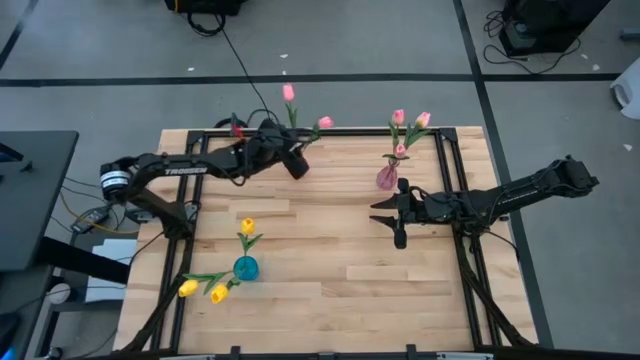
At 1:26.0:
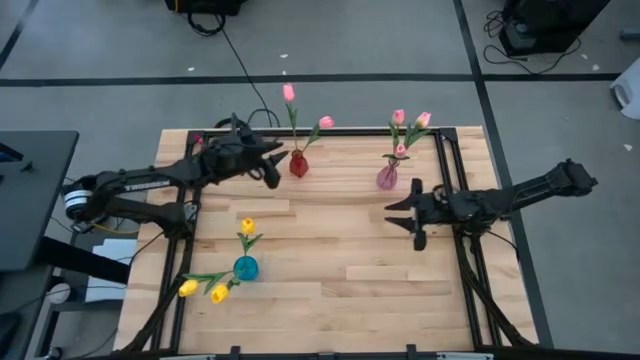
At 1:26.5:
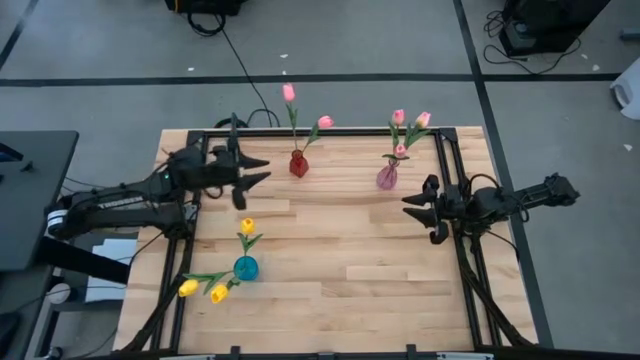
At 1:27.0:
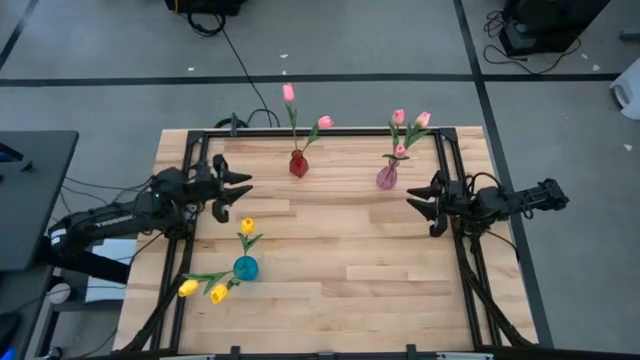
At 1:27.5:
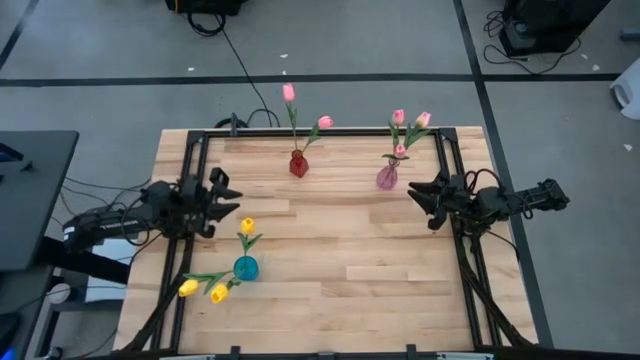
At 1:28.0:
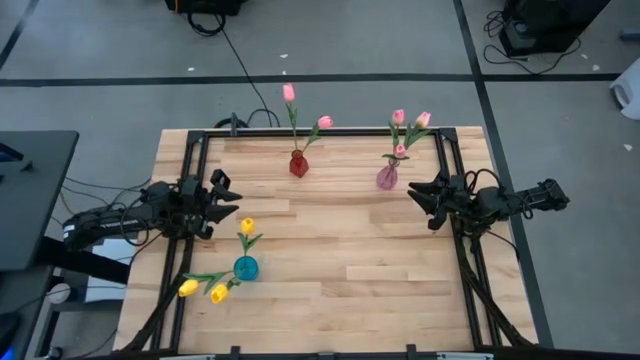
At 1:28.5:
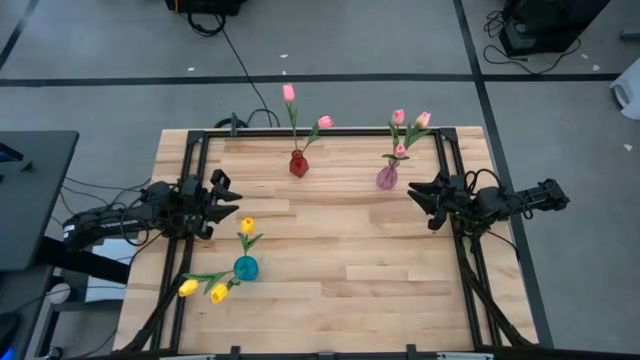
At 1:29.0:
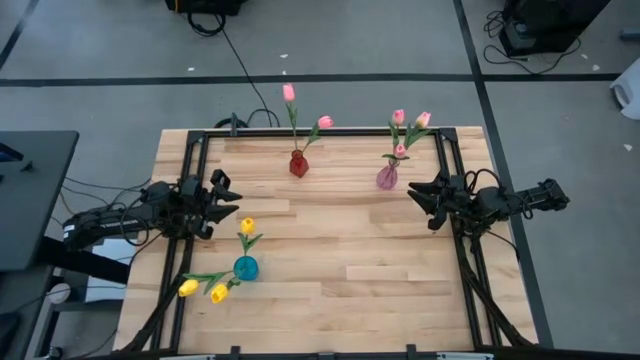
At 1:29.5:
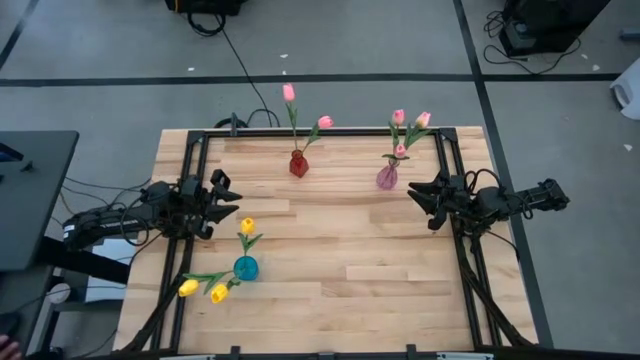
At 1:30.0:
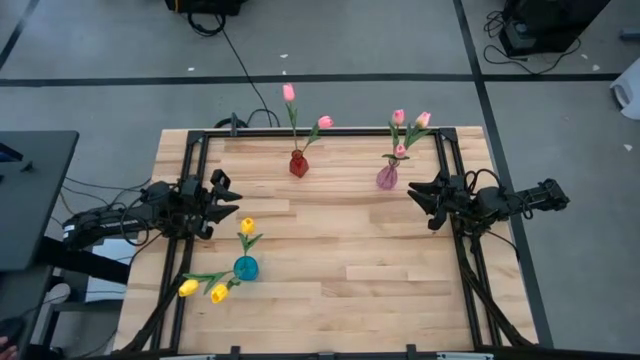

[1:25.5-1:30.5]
Task: Sort flowers into vase by color
Return to Home Position

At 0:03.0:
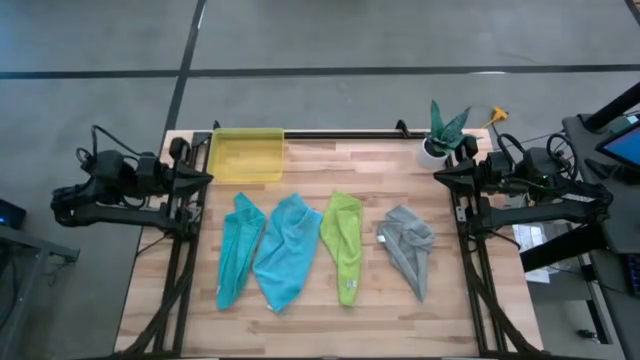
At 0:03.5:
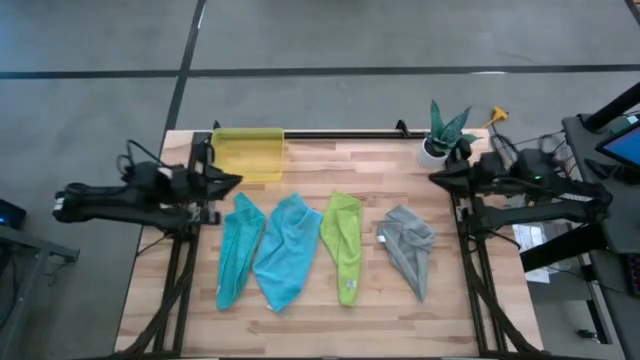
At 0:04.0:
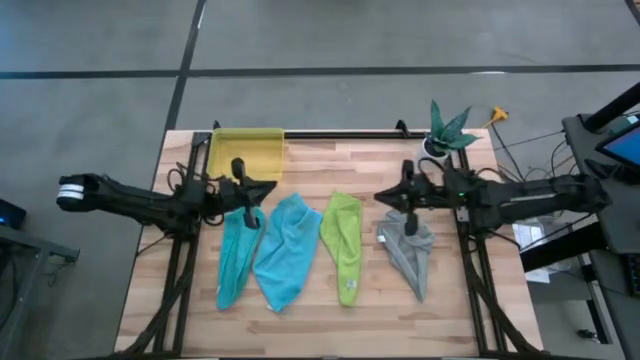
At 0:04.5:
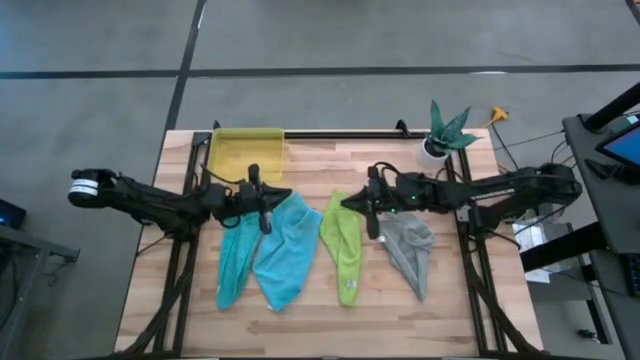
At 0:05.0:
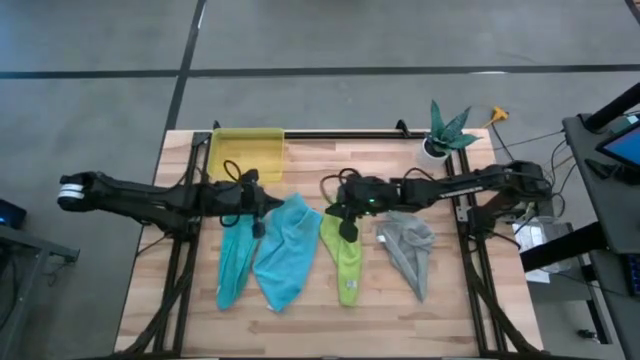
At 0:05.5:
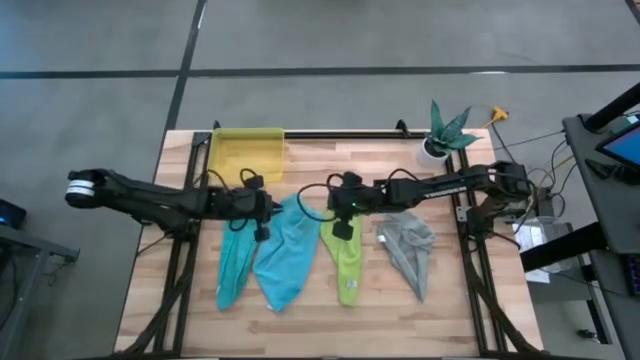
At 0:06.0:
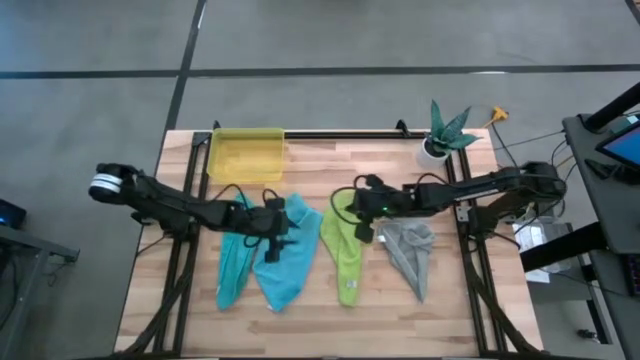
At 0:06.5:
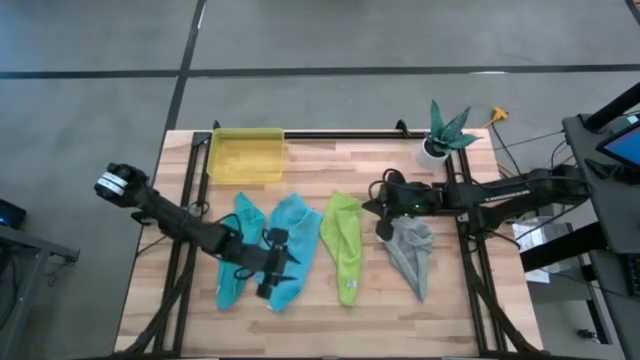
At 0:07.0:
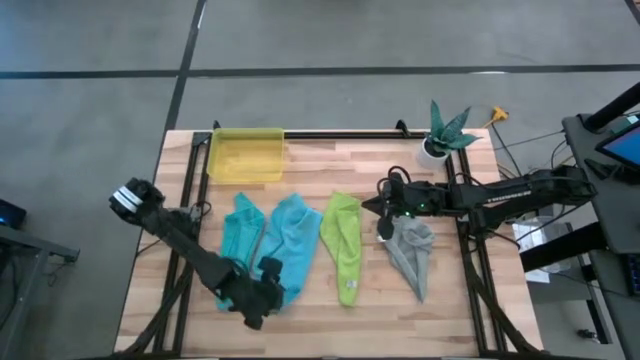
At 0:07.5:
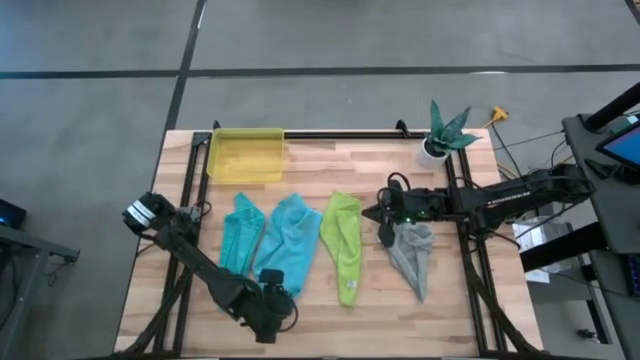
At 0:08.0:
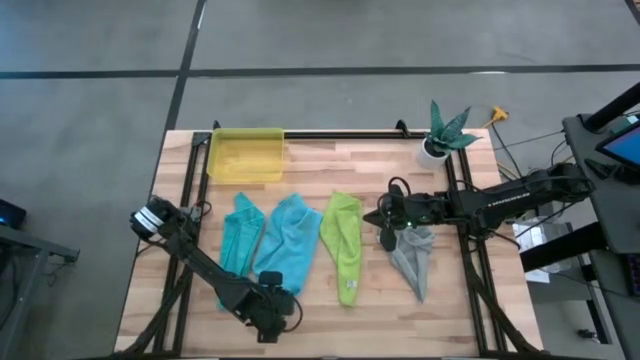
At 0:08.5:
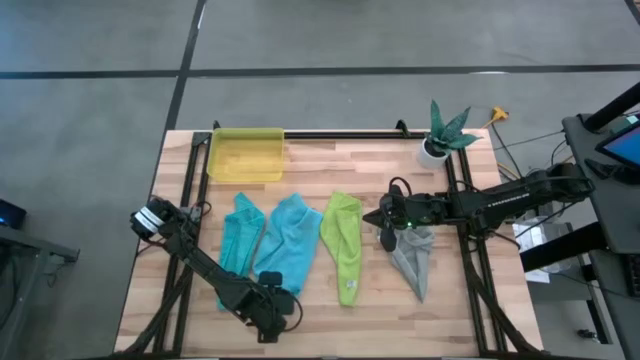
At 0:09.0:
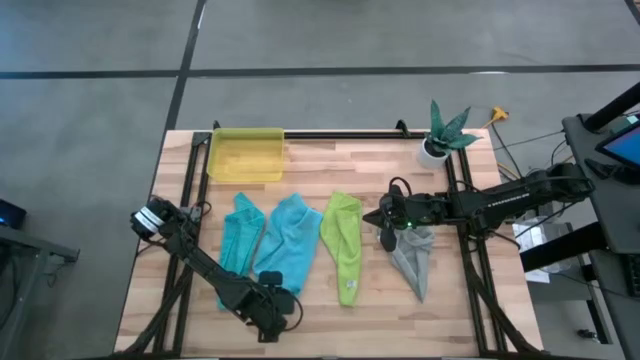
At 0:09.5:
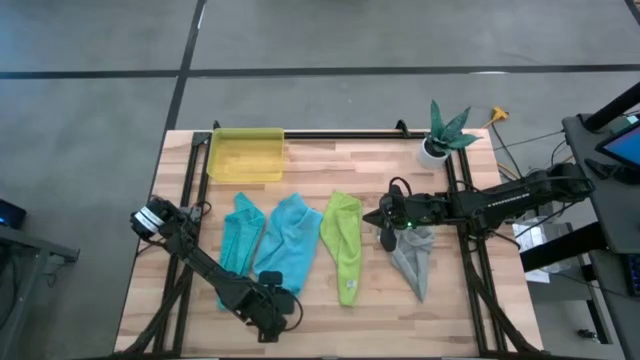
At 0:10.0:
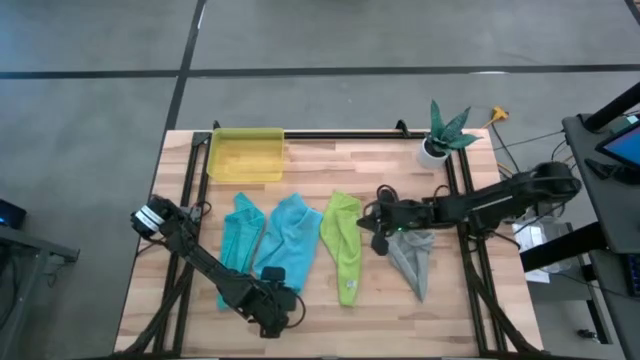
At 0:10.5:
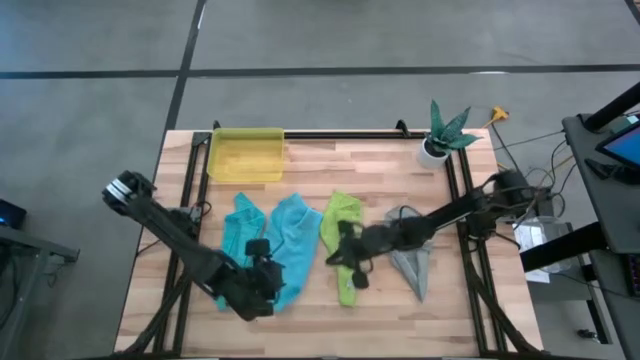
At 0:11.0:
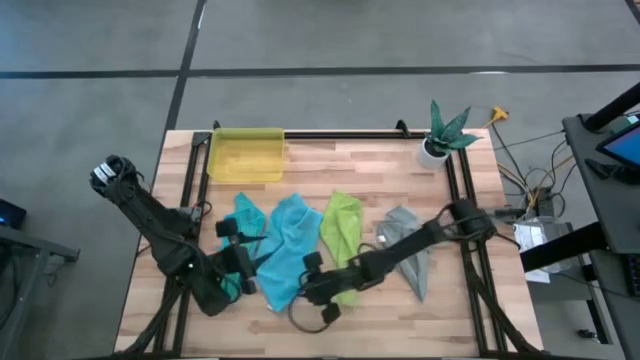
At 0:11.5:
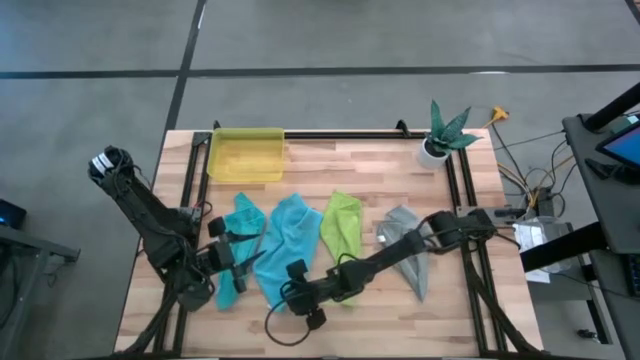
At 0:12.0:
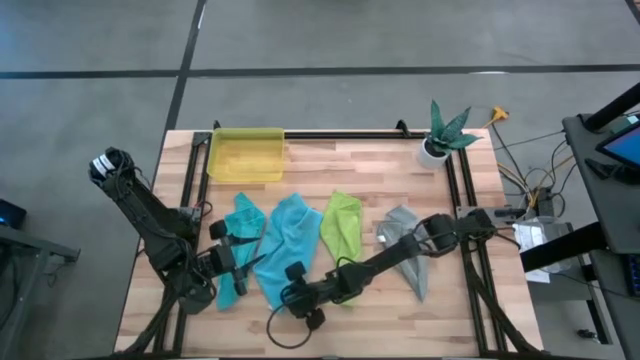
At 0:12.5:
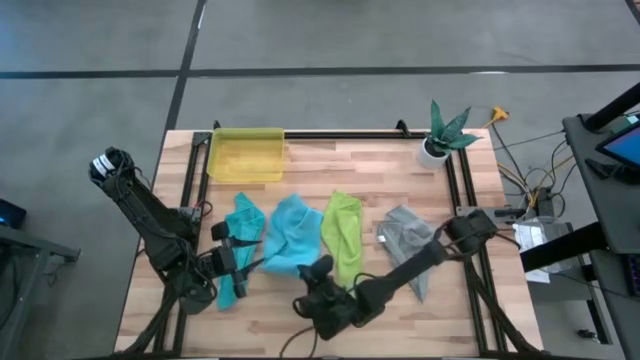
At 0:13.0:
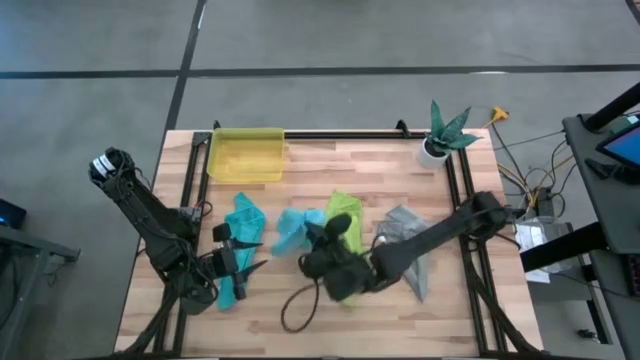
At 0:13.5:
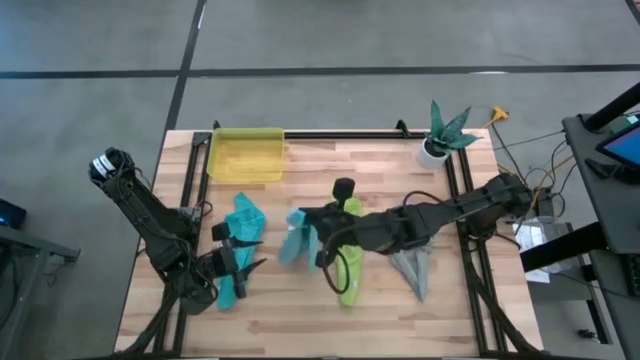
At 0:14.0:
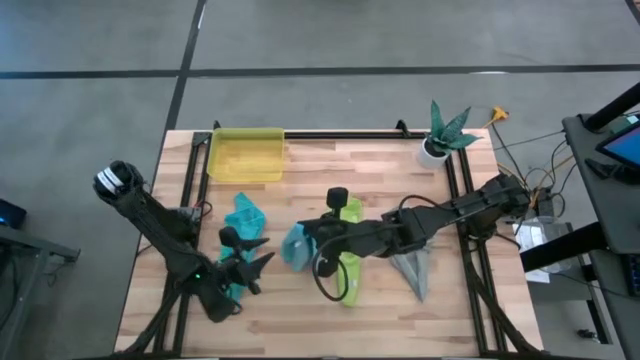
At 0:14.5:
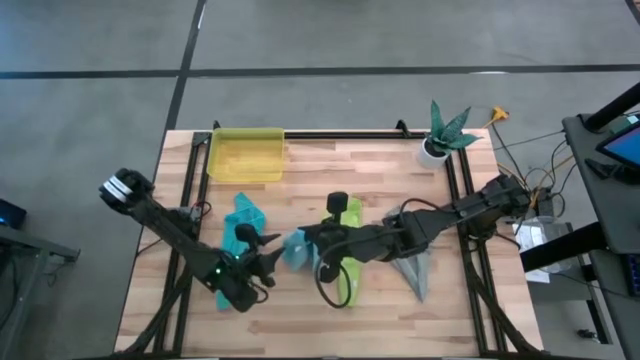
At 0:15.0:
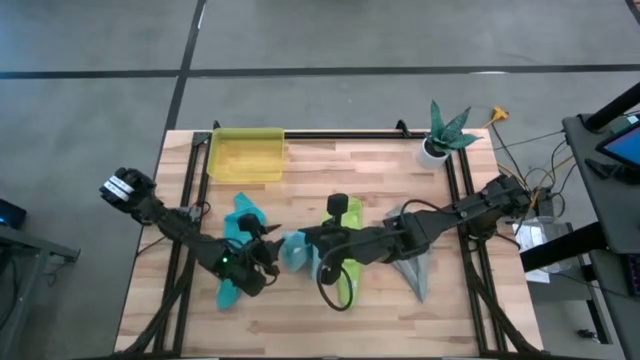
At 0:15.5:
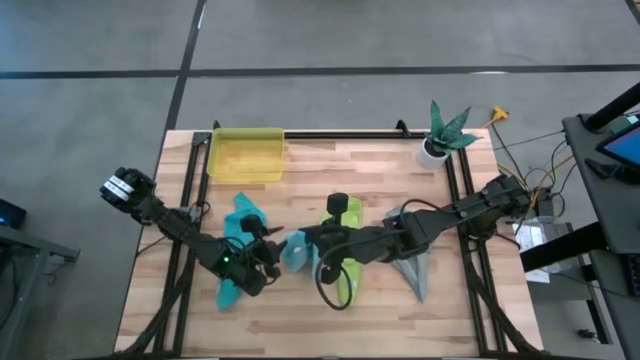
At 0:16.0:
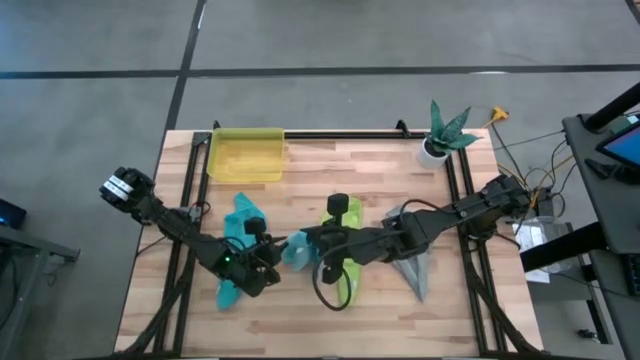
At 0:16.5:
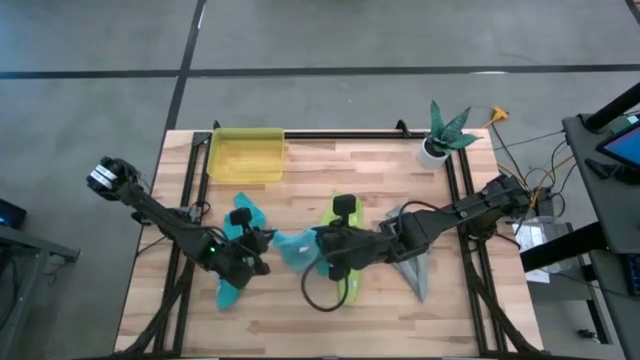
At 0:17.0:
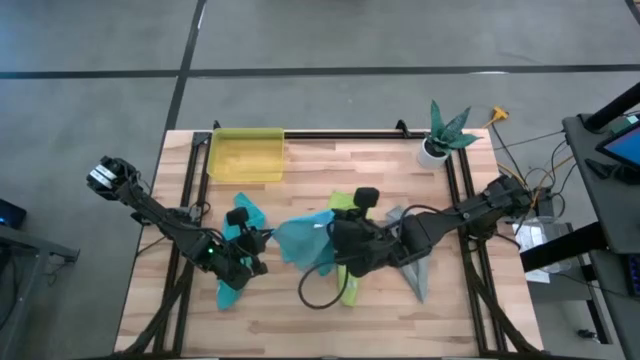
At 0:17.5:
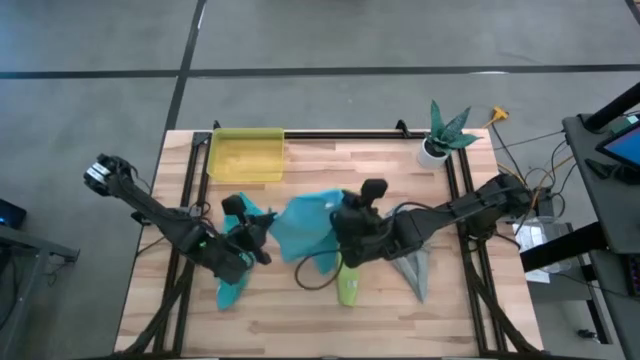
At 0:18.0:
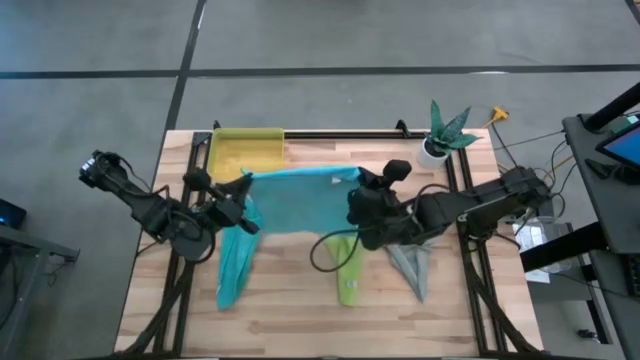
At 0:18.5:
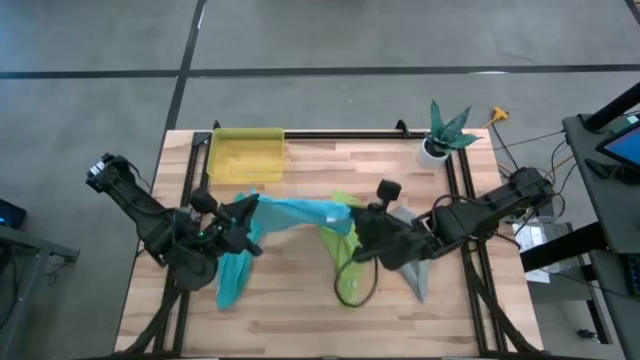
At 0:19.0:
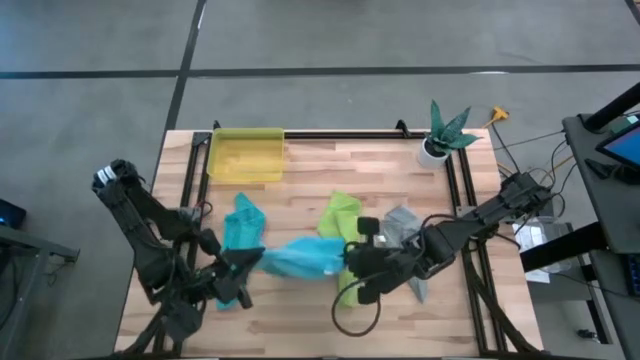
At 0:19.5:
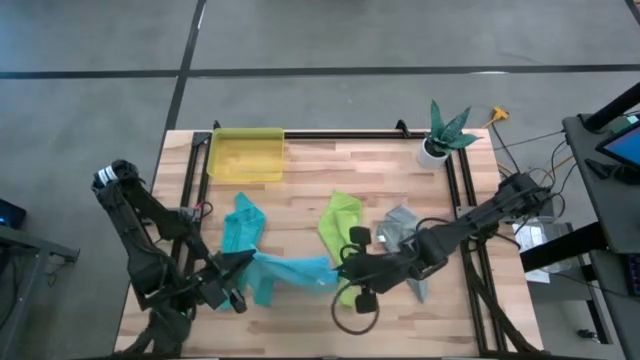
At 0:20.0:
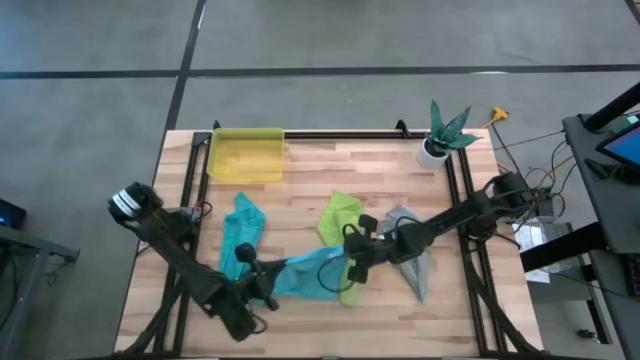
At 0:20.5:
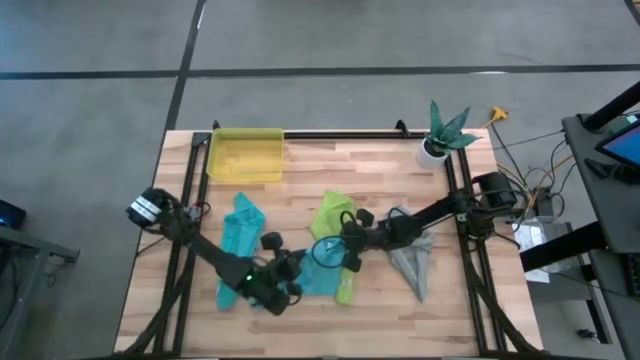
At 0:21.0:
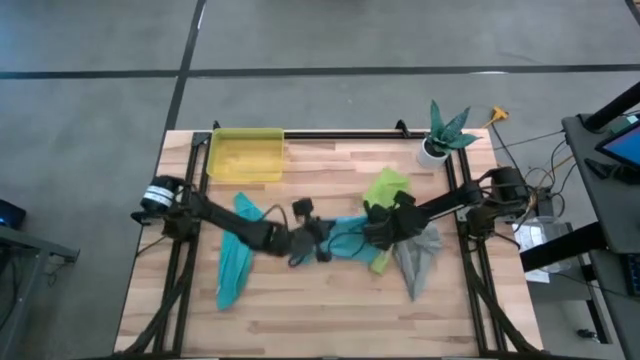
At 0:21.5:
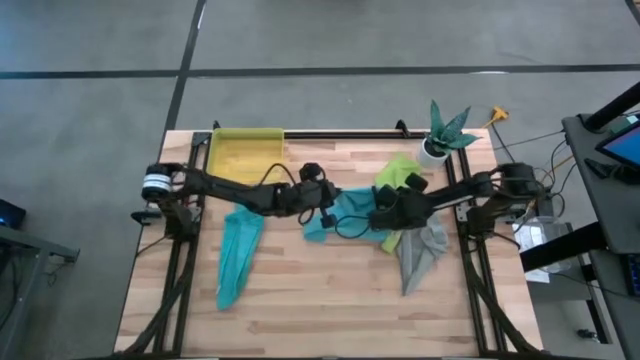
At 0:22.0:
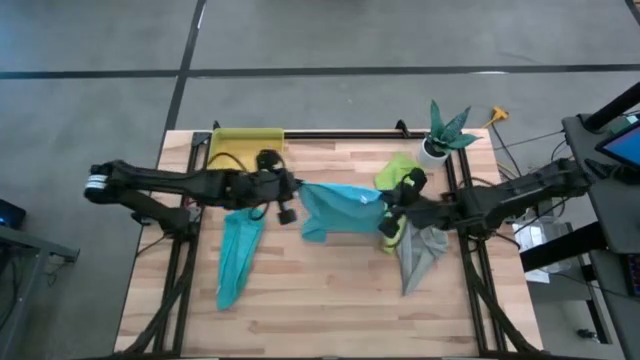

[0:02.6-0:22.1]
Task: Roll microfiber towels into tight, uniform cylinder then place into a basket
Roll the right light blue towel
